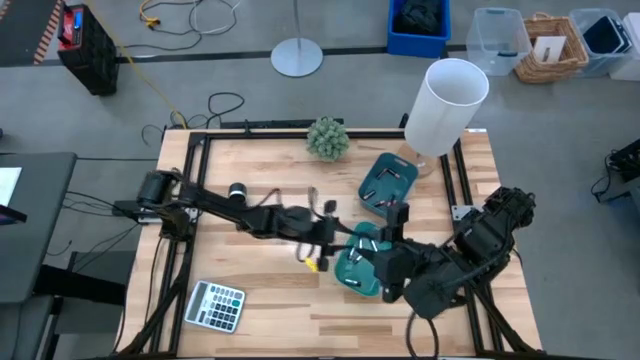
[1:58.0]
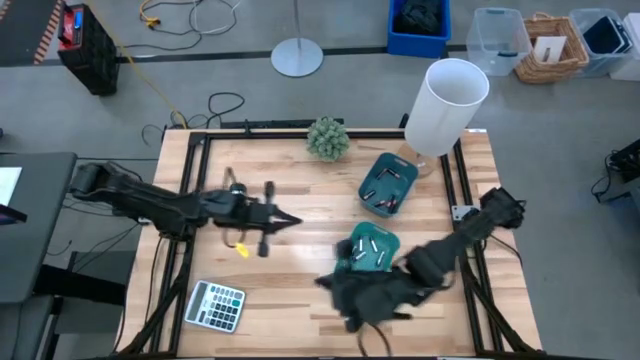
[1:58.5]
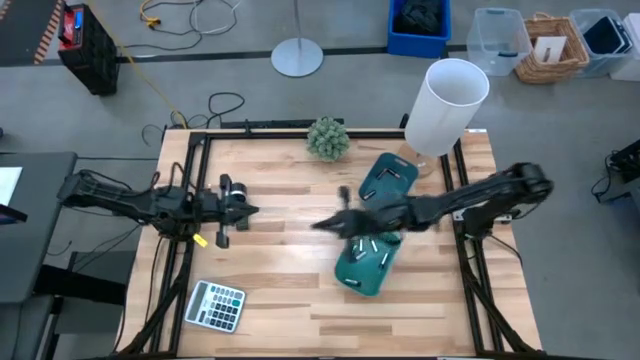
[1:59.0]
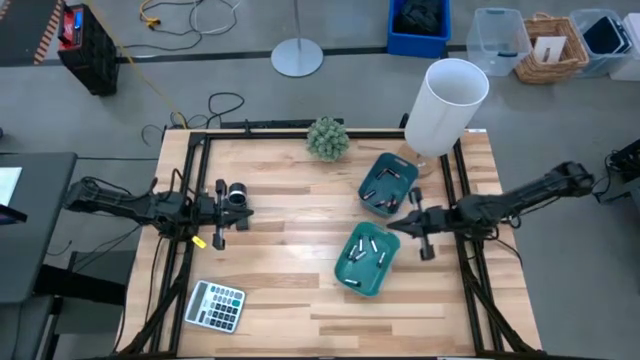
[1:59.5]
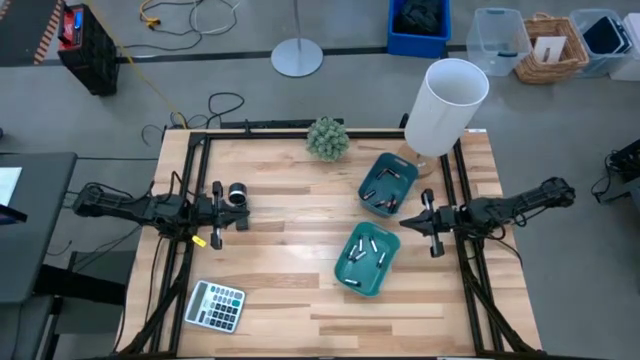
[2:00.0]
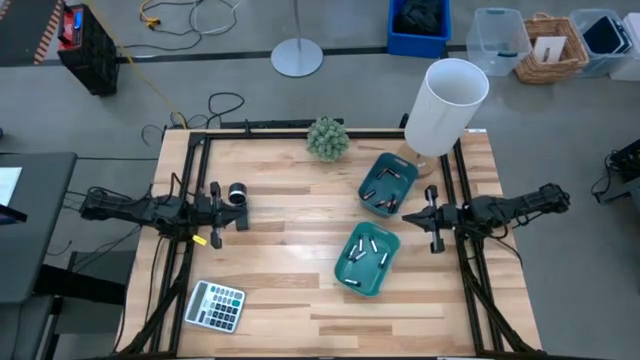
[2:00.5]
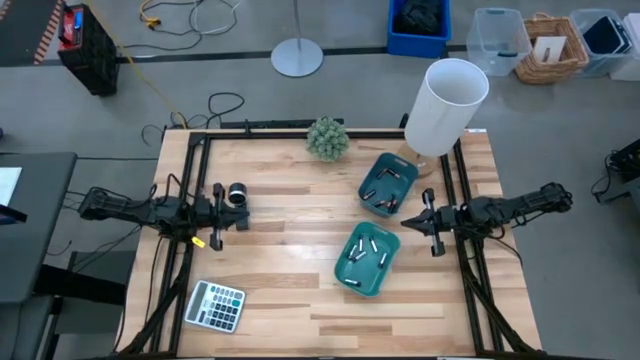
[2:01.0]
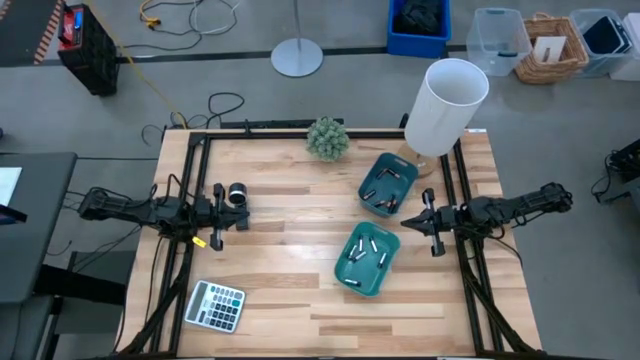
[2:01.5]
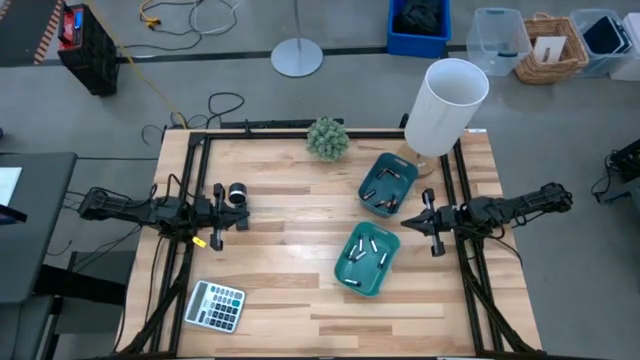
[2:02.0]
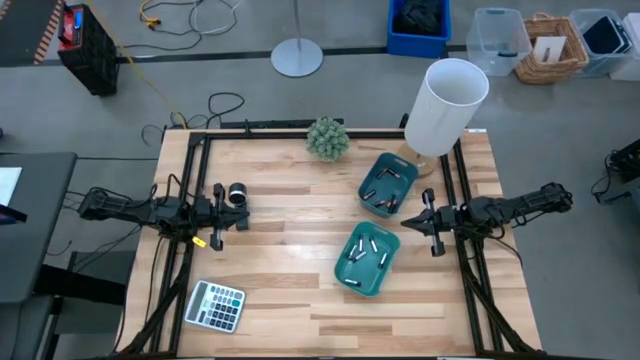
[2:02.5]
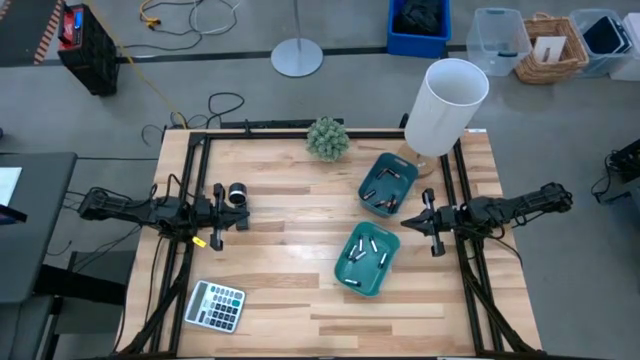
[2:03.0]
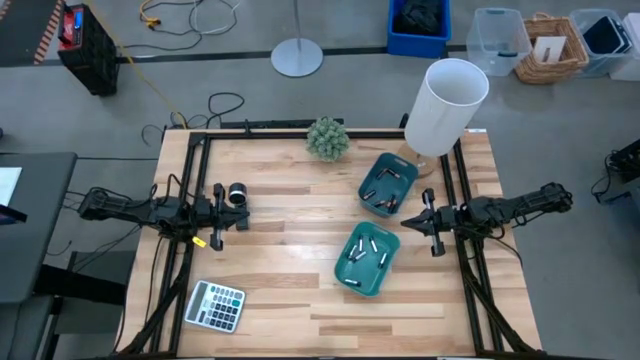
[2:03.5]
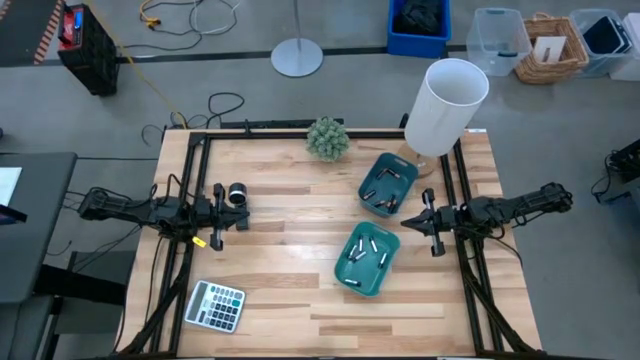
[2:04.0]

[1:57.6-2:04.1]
Task: Sort batteries
Return to Home Position

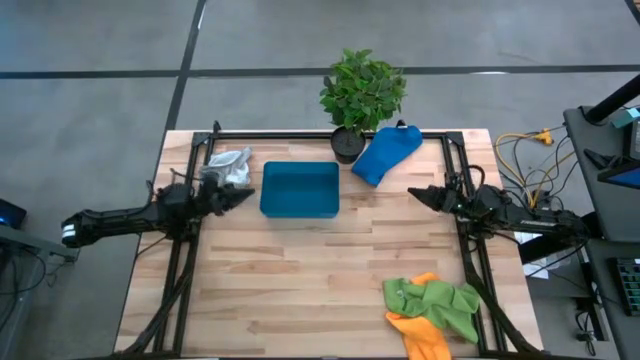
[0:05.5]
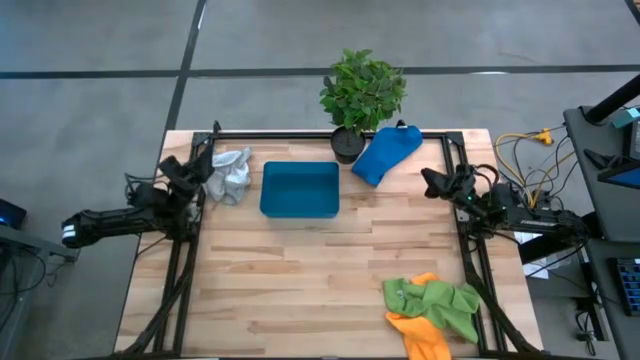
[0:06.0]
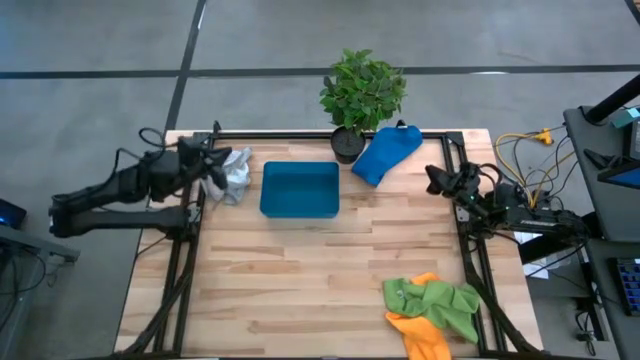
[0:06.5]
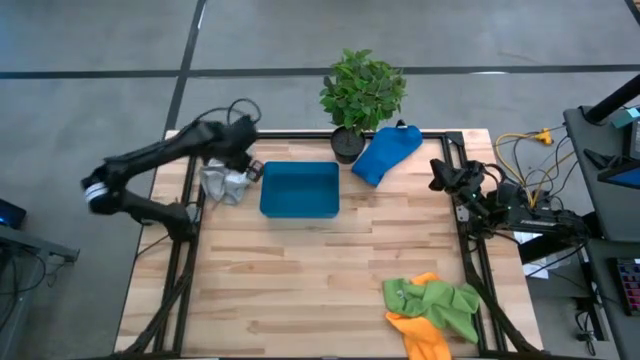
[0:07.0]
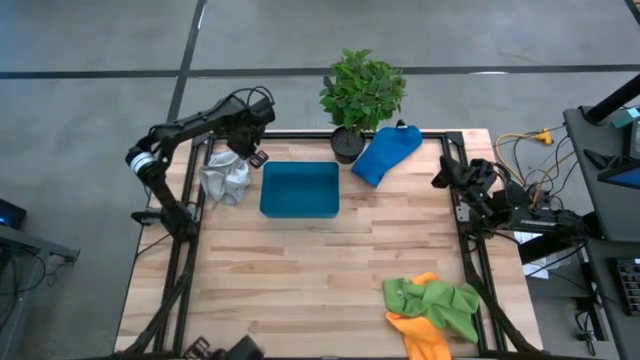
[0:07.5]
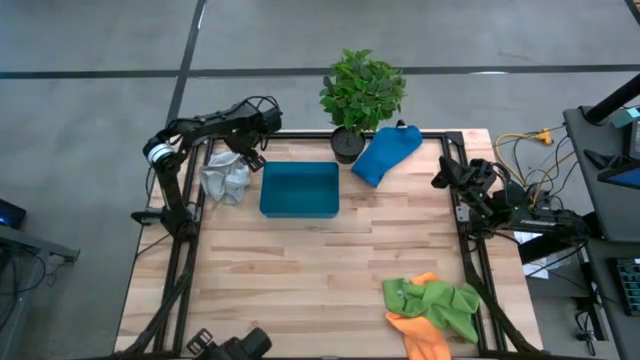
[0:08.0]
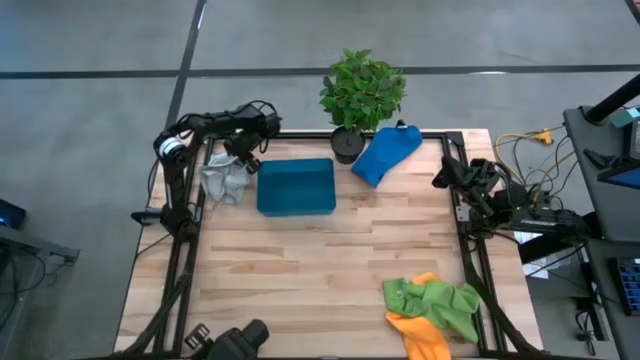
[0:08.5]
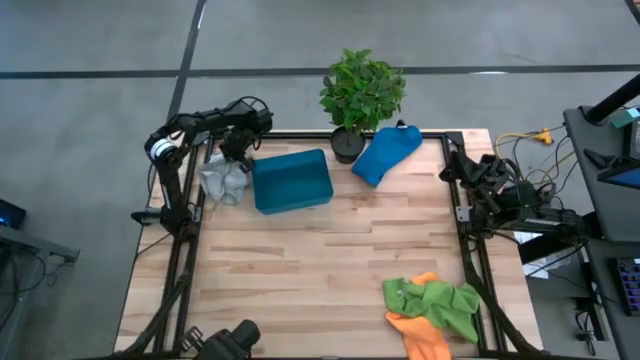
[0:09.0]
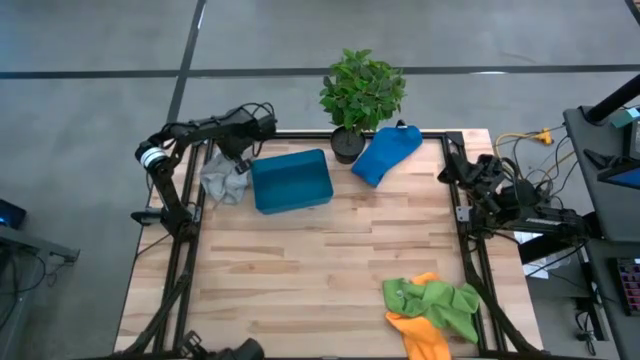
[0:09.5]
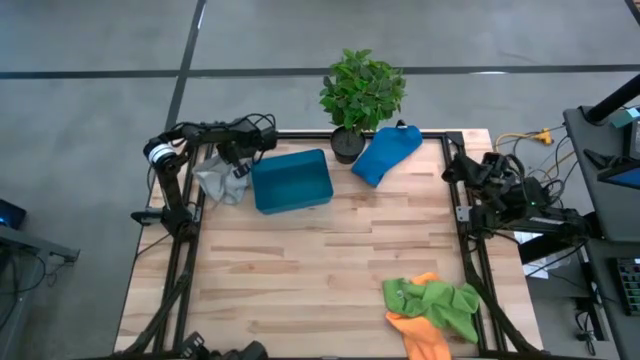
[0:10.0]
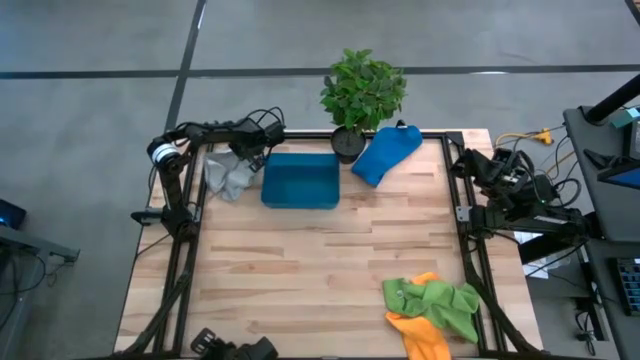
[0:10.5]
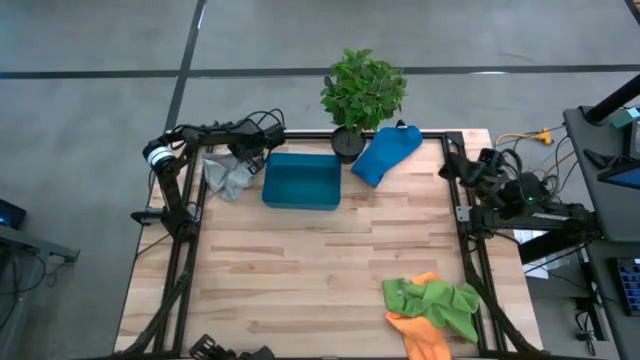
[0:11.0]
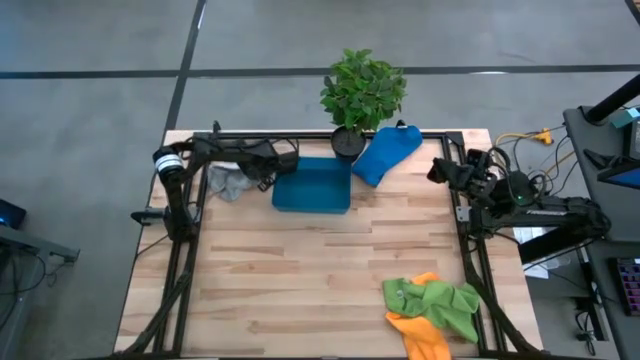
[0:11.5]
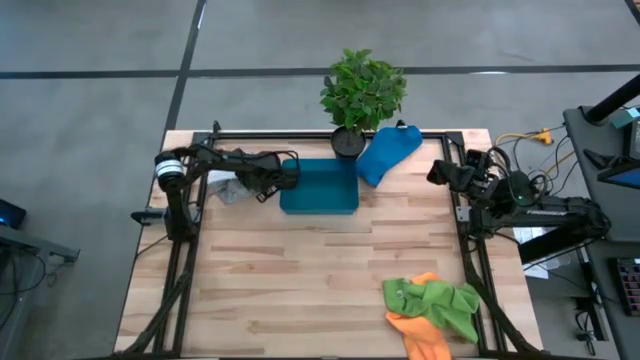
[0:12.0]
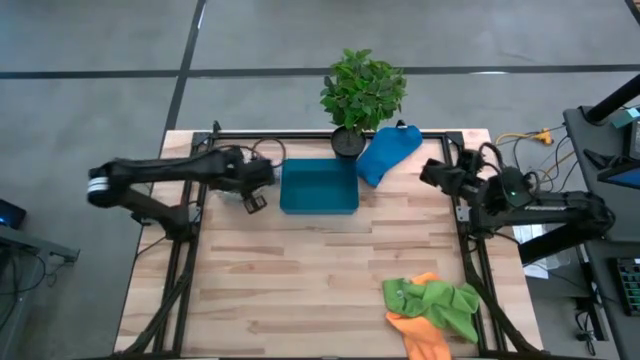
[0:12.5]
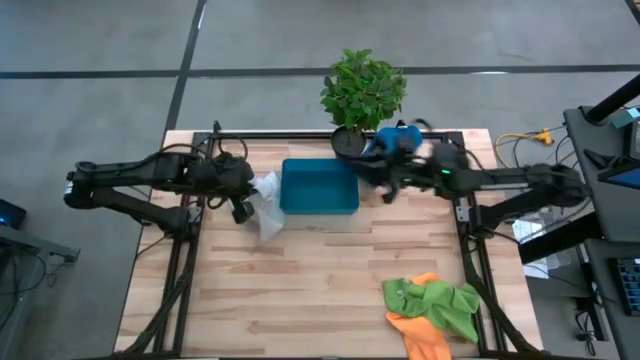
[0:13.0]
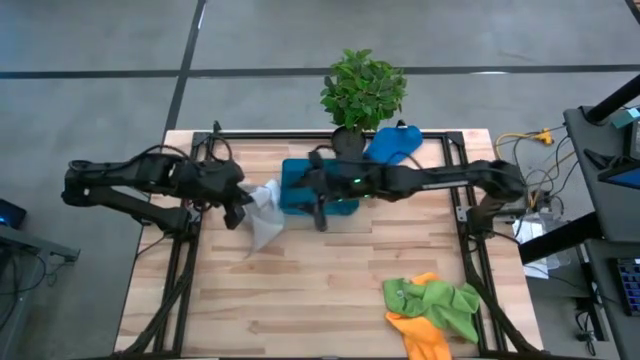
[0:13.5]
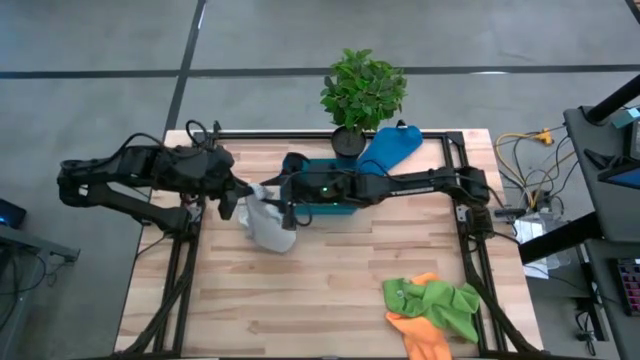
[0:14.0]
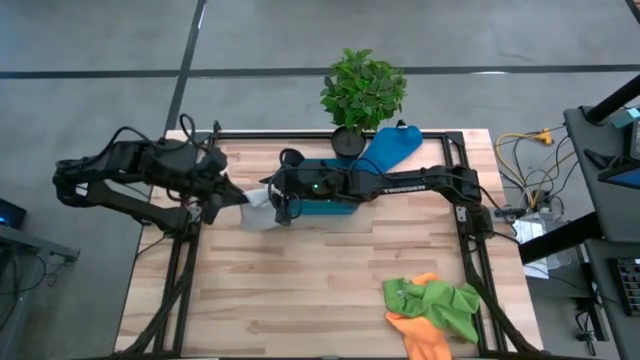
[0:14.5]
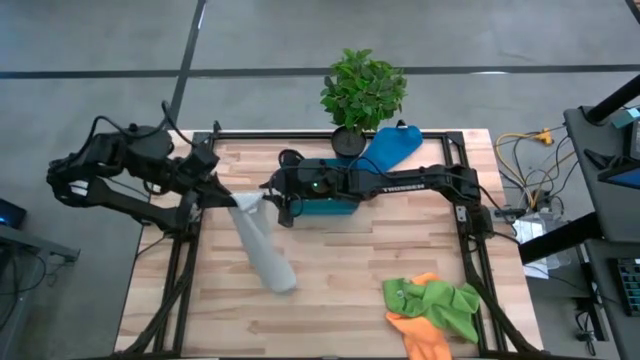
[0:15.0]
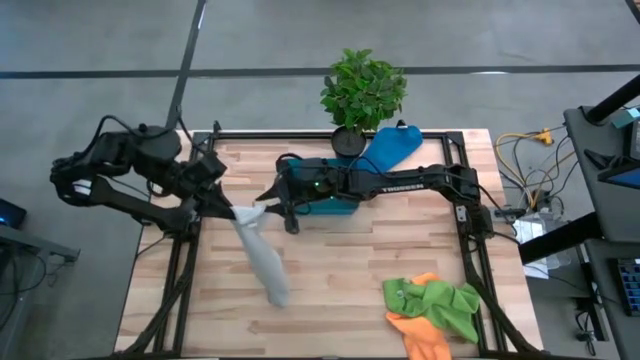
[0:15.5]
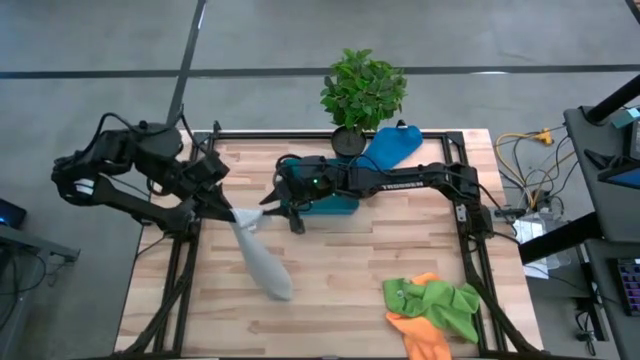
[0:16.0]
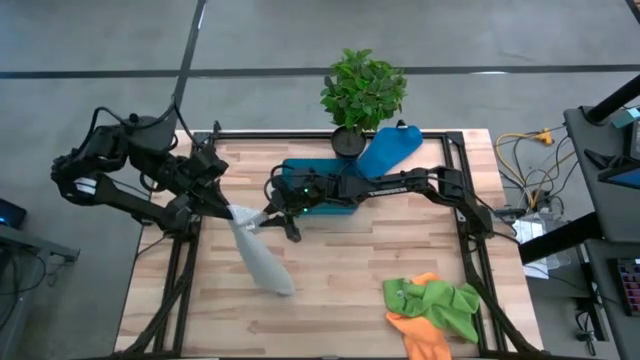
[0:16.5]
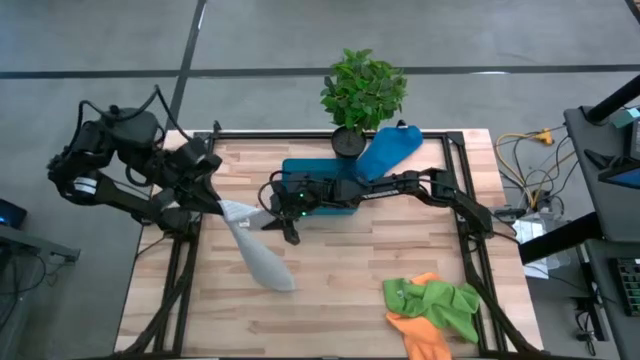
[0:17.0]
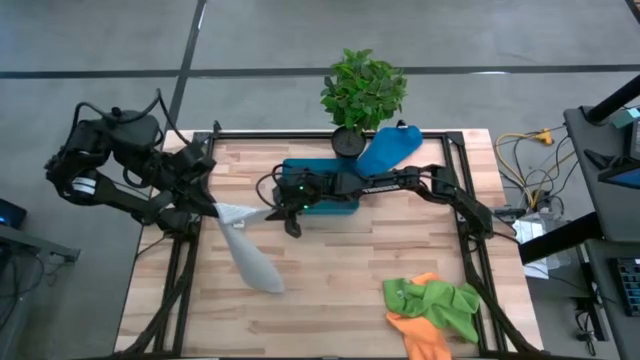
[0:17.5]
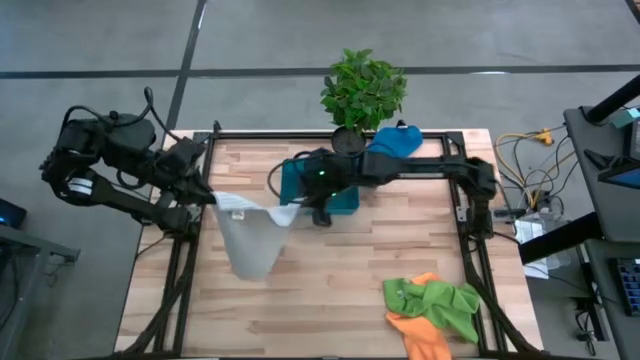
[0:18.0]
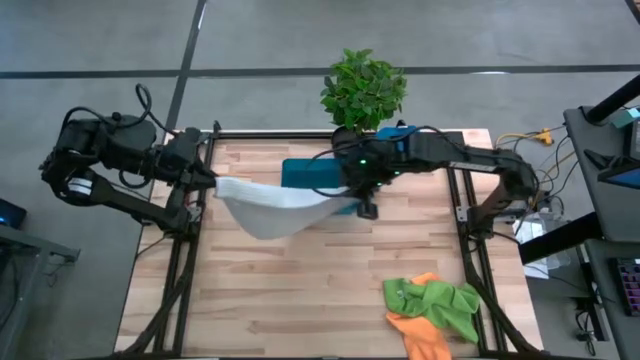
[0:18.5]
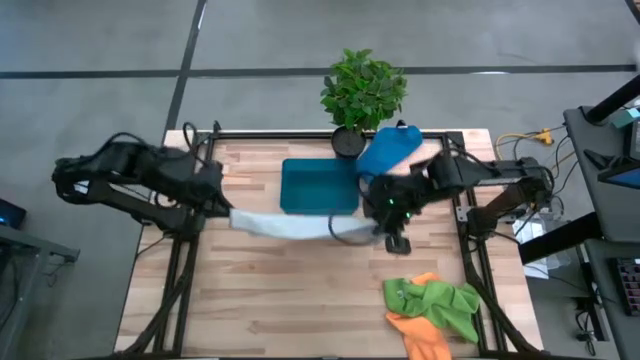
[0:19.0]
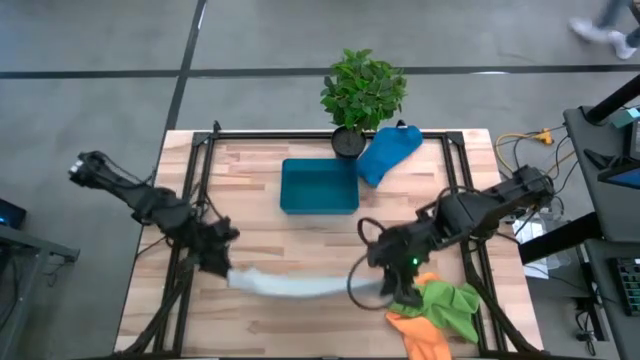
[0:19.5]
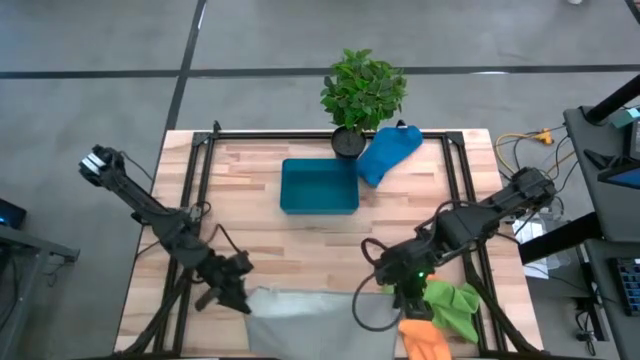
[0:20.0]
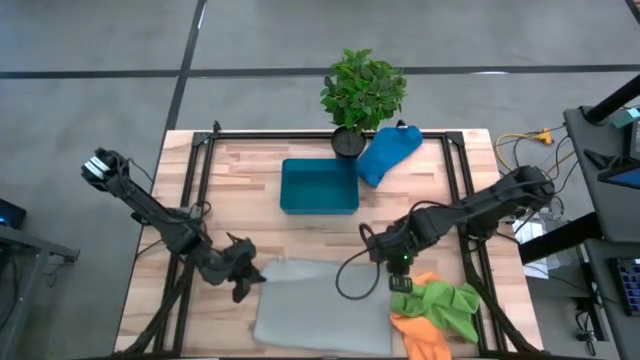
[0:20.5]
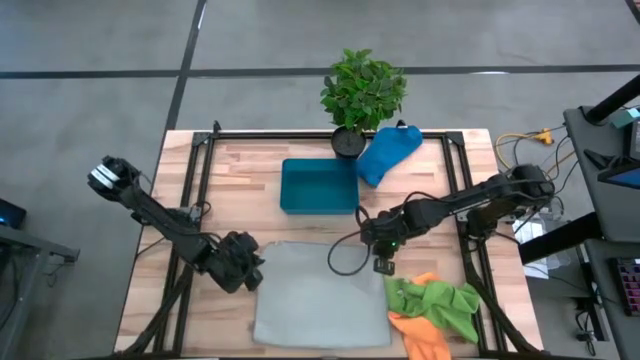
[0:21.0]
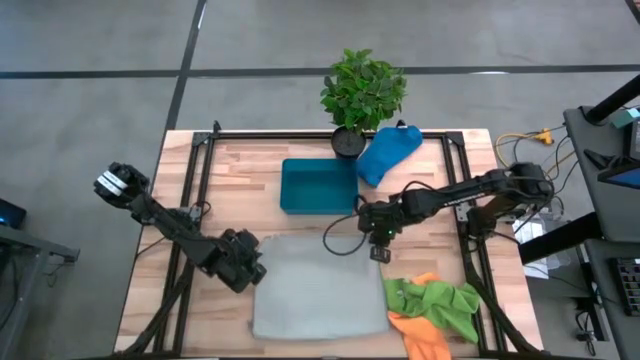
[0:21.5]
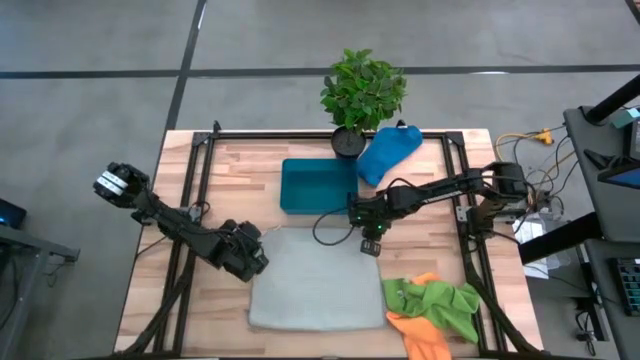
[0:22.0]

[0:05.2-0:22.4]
Task: Fold microfiber towels
Fold the gray microfiber towel
